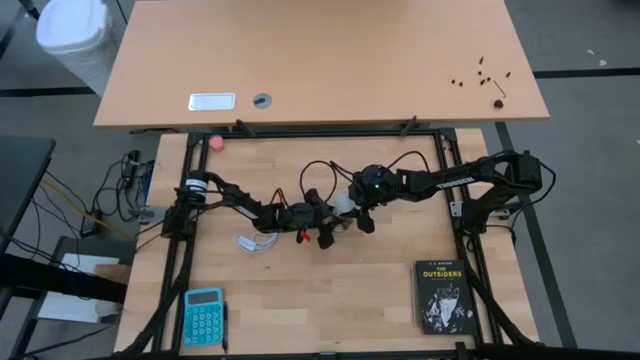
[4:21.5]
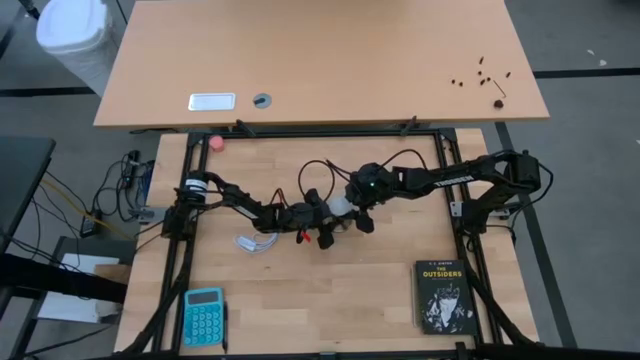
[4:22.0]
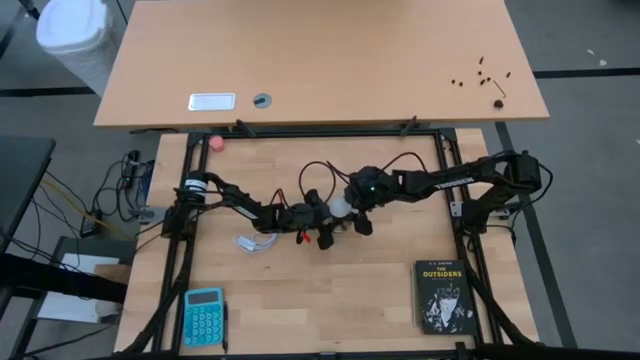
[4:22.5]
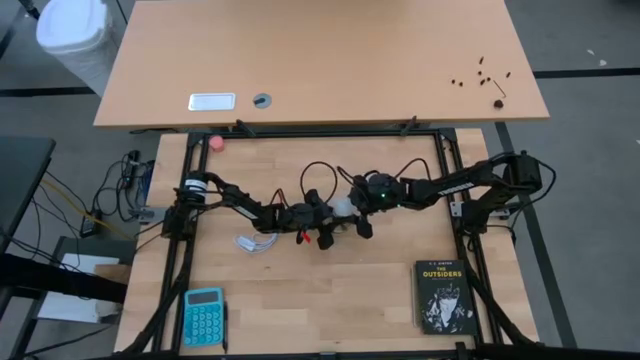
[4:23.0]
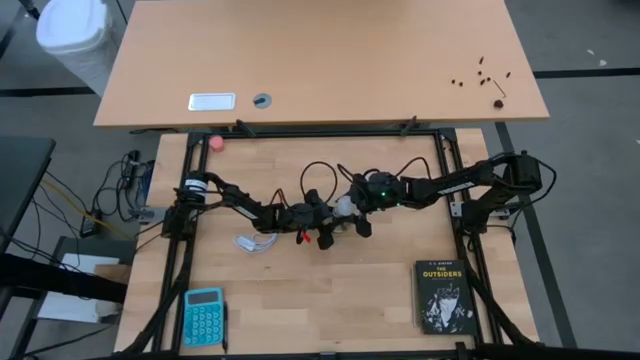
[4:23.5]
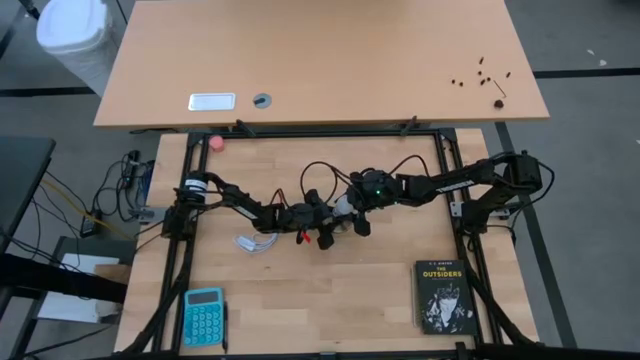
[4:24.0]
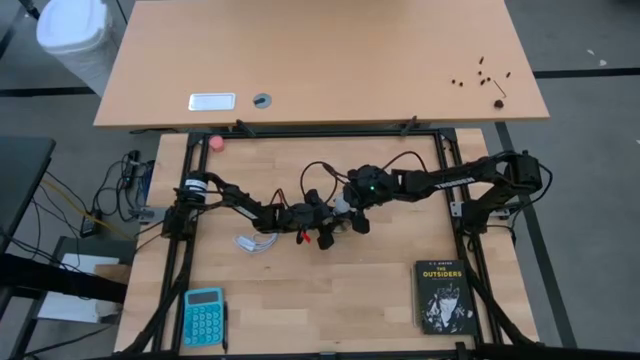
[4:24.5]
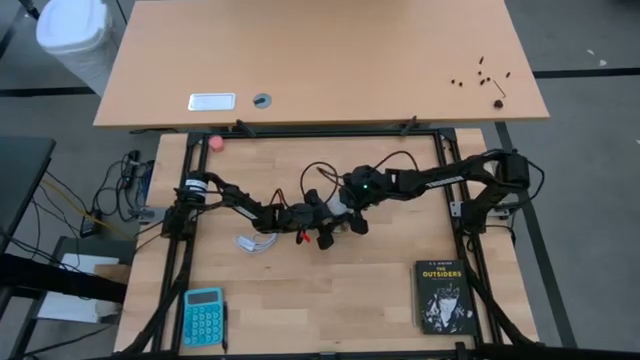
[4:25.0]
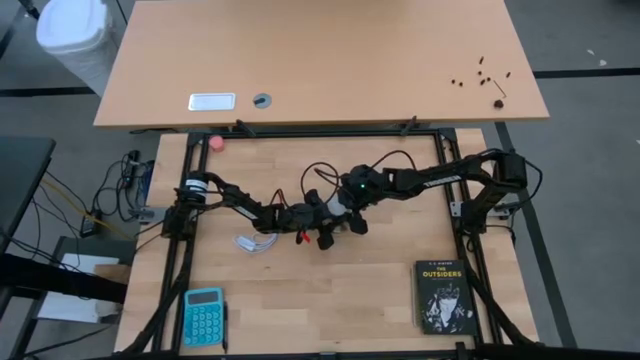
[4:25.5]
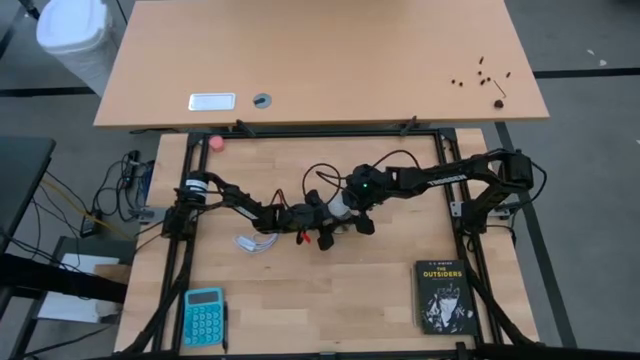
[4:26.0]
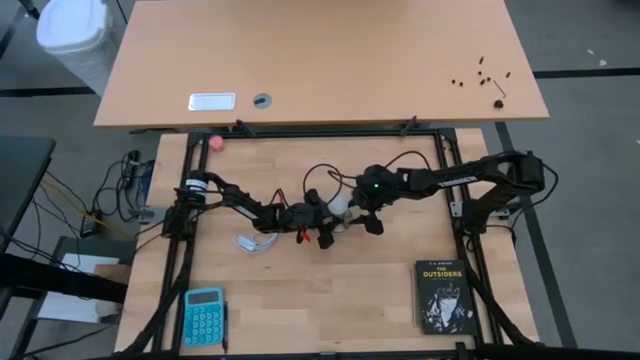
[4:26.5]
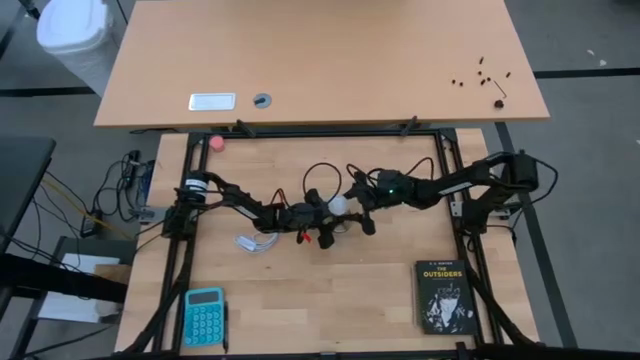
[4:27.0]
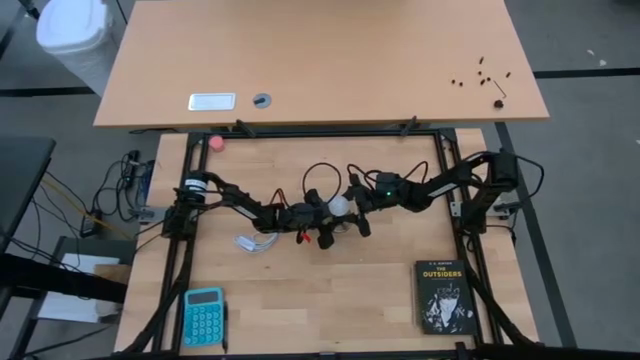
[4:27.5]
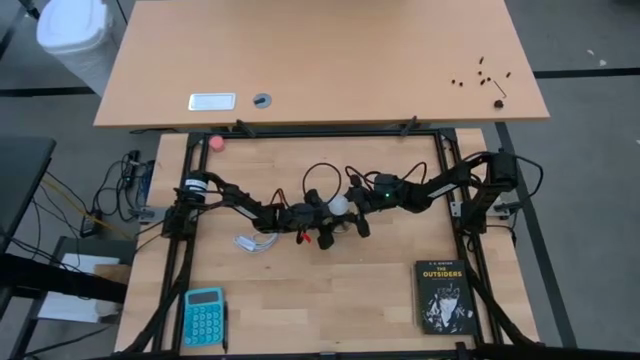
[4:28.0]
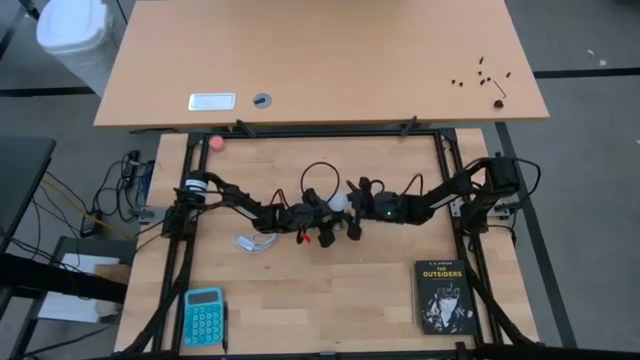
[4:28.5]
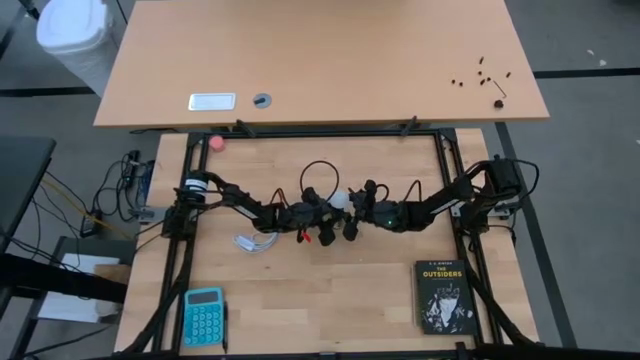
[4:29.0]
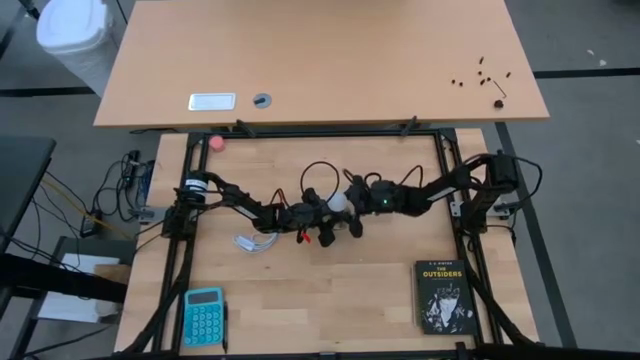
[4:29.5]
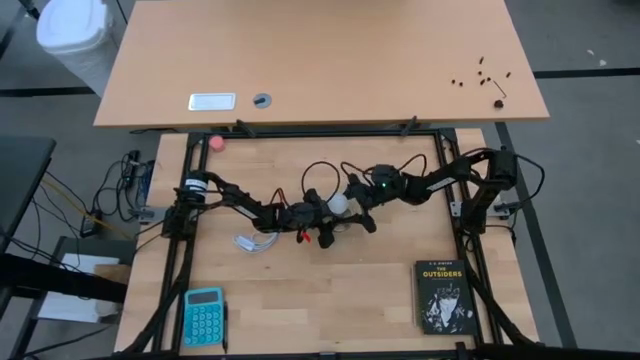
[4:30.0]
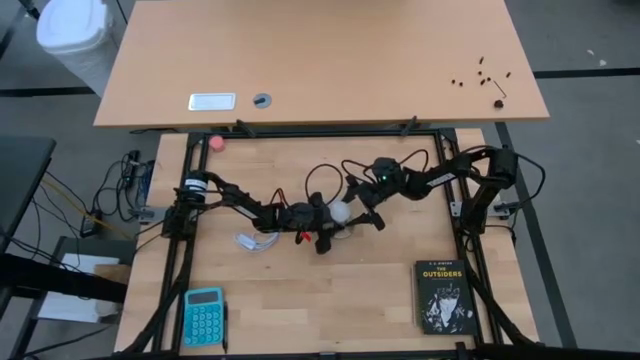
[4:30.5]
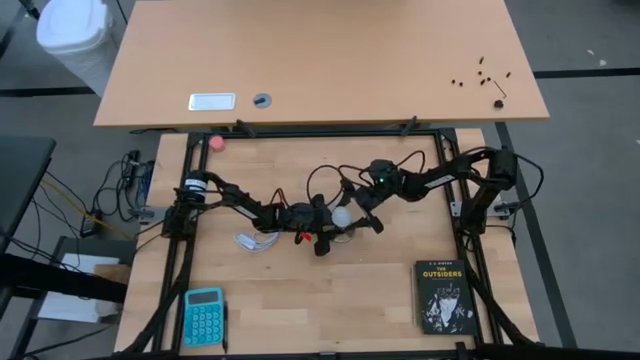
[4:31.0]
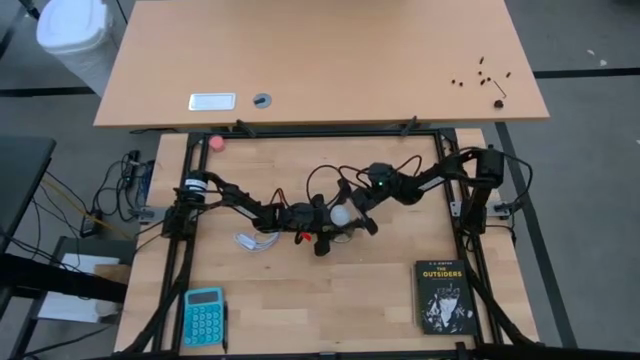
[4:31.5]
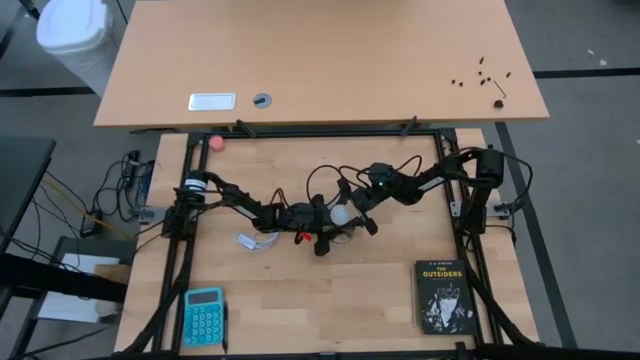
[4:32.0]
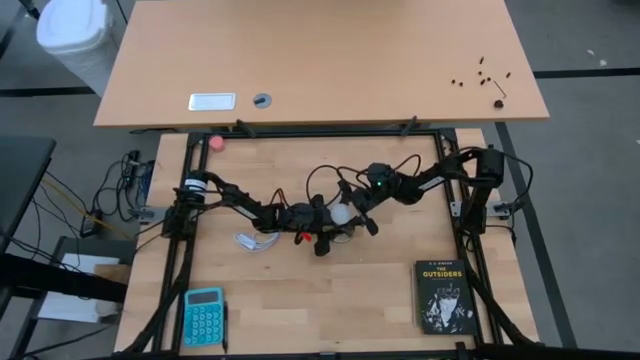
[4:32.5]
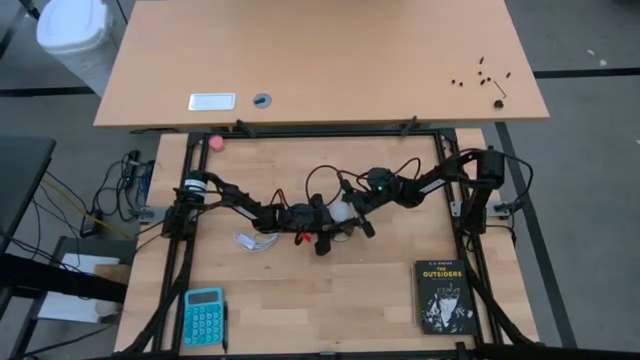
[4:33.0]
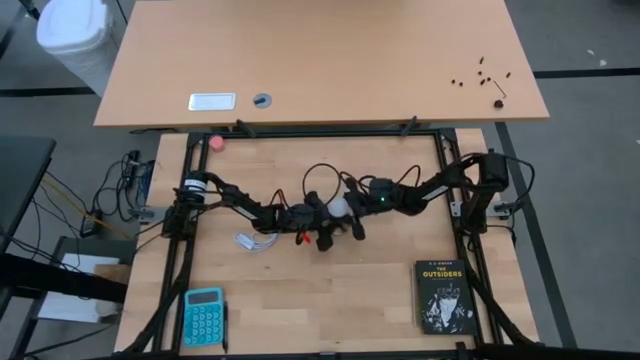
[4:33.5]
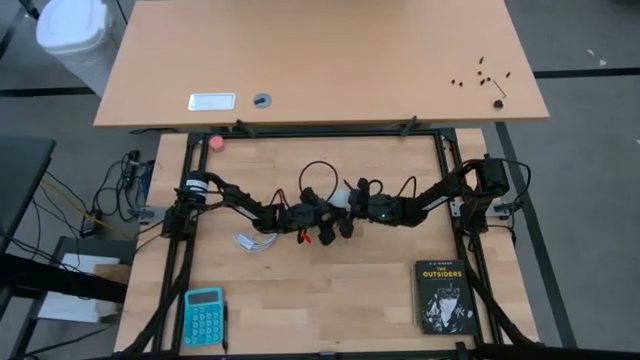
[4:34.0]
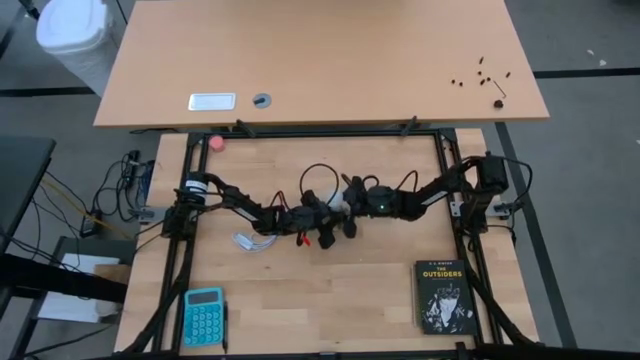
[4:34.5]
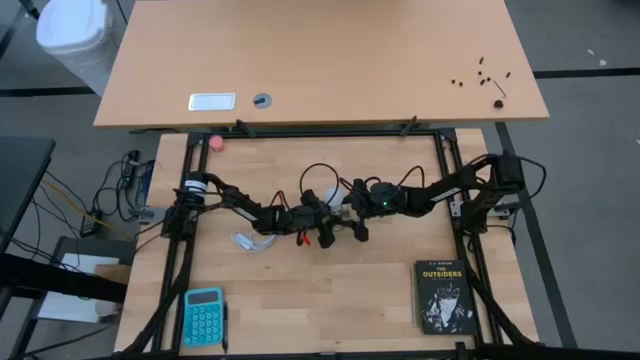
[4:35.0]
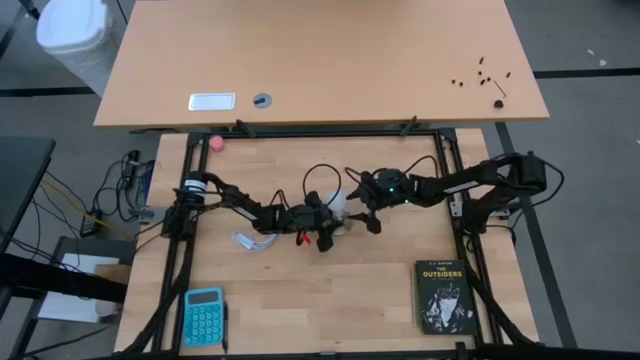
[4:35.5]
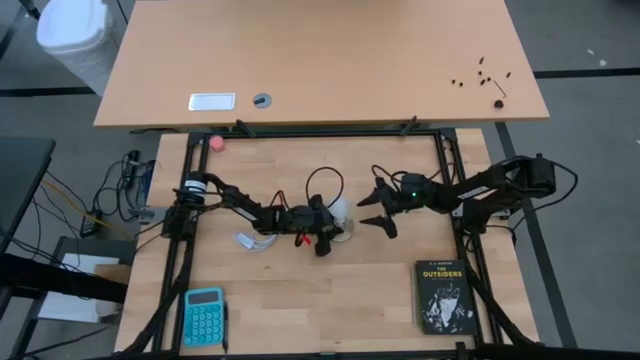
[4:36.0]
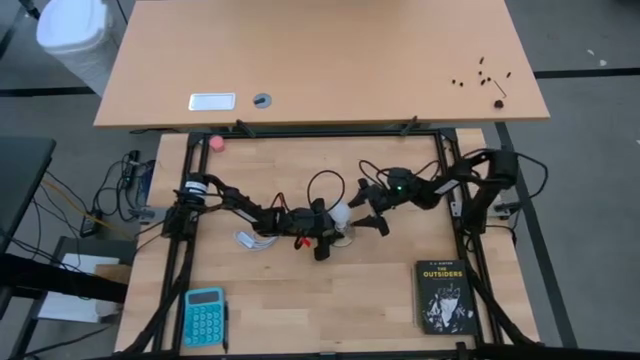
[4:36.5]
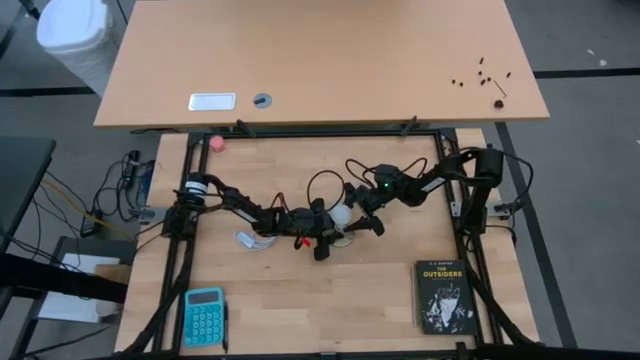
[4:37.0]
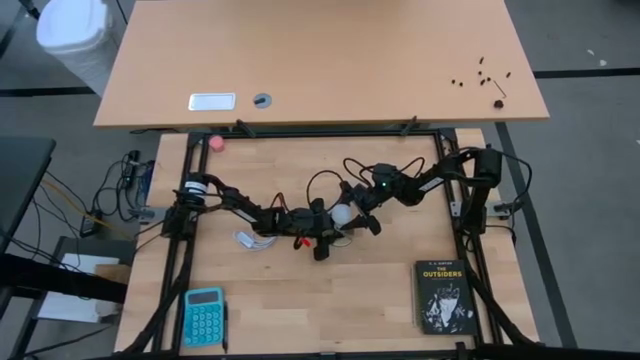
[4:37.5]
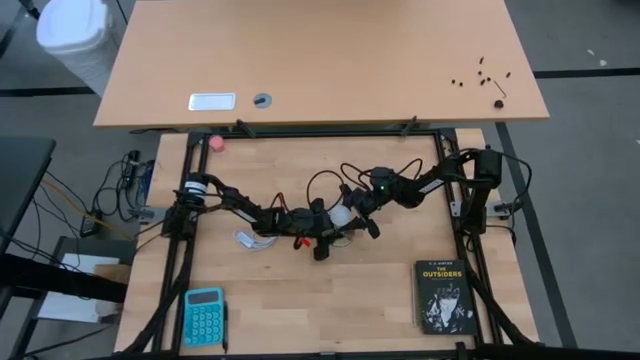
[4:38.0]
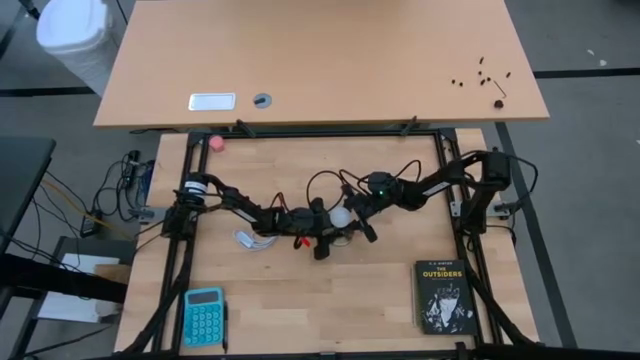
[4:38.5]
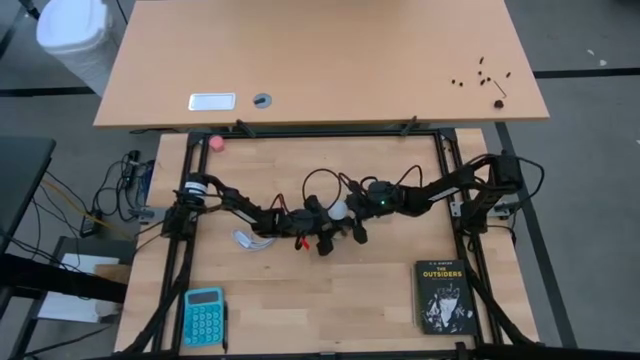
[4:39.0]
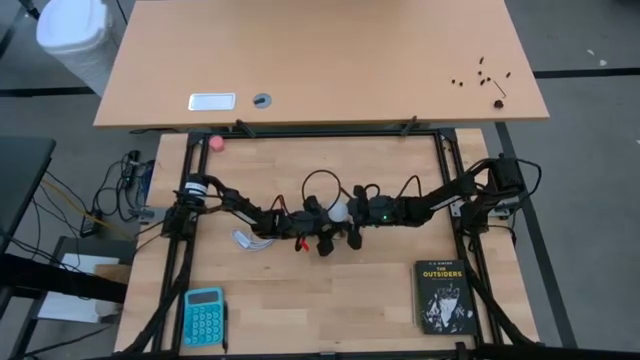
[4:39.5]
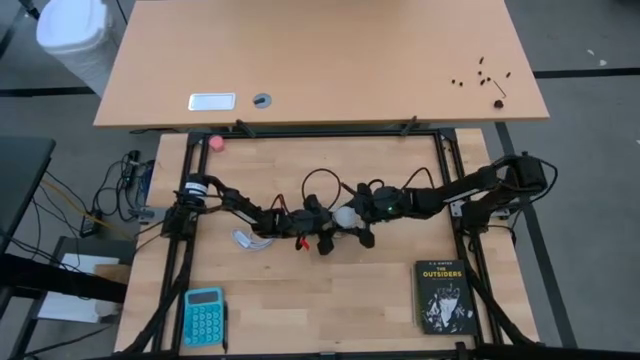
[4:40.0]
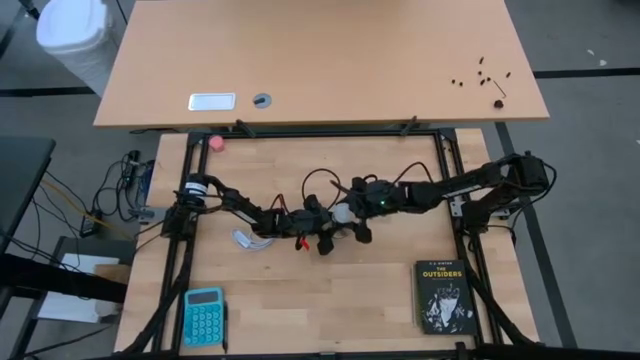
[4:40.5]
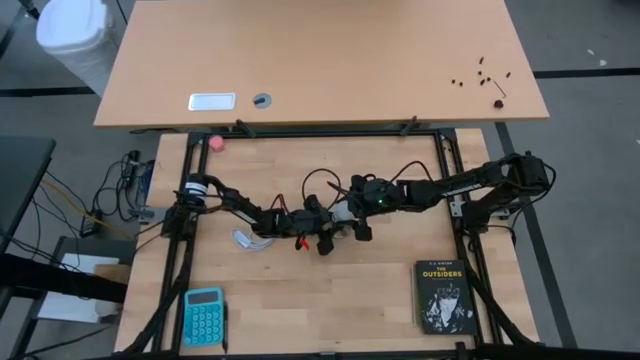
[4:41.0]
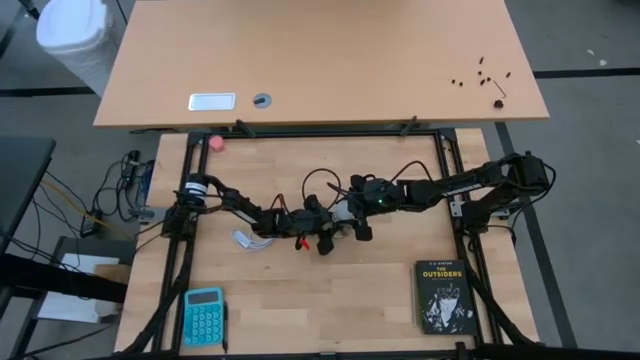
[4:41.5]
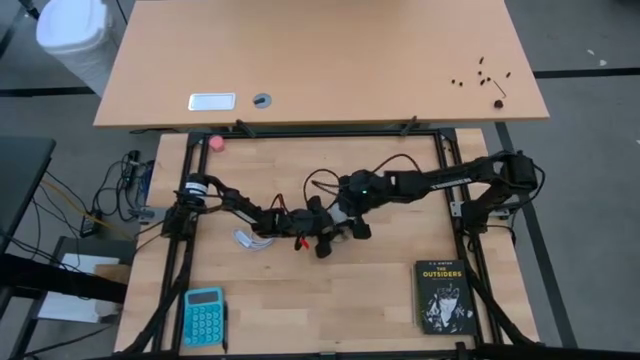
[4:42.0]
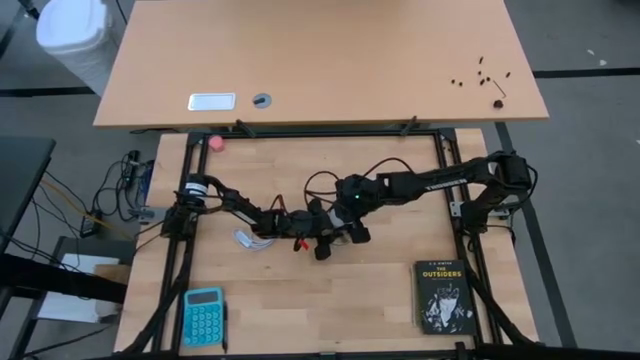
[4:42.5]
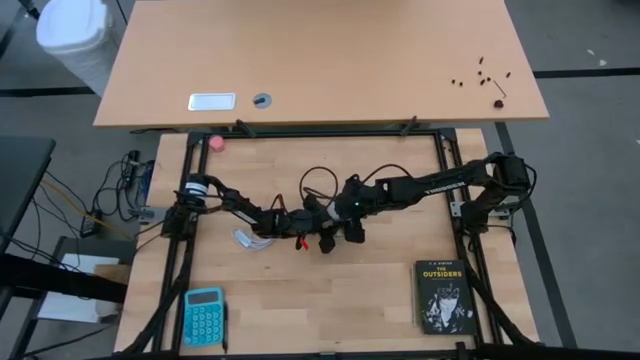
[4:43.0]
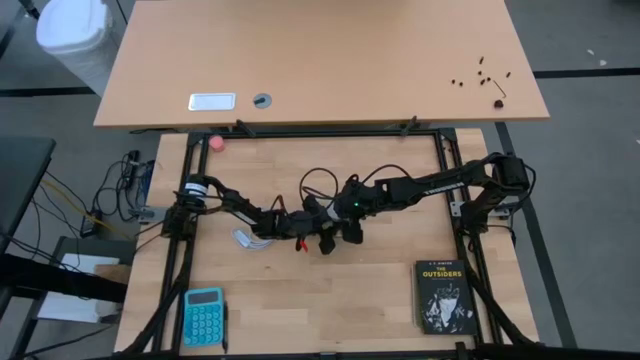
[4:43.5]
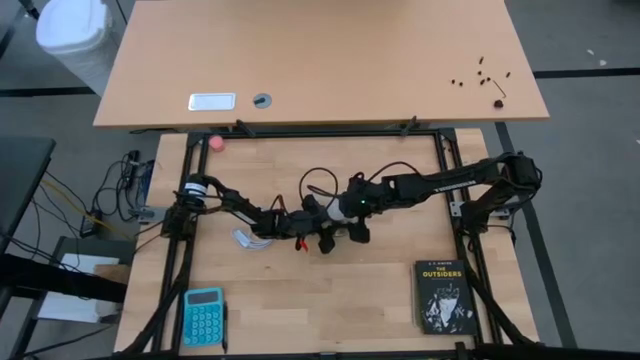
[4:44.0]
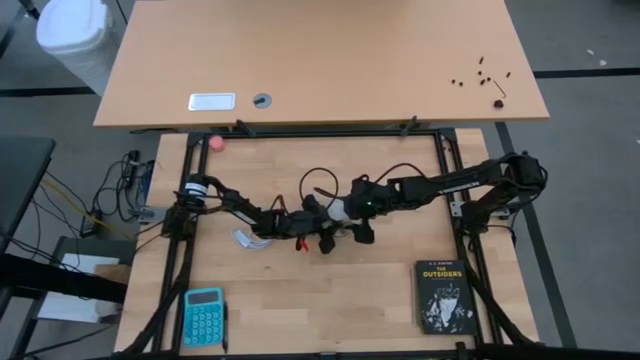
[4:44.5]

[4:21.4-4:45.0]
Task: Screw lightbulb
Insert the white lightbulb into the silver lamp
